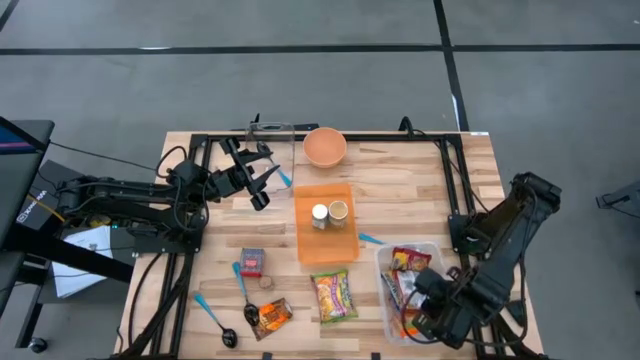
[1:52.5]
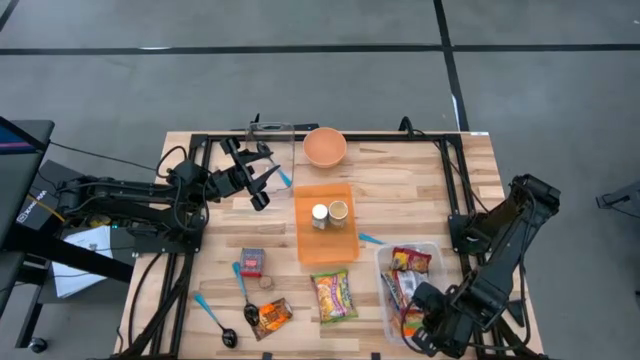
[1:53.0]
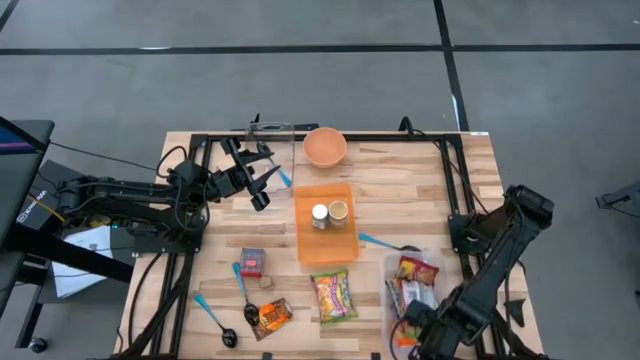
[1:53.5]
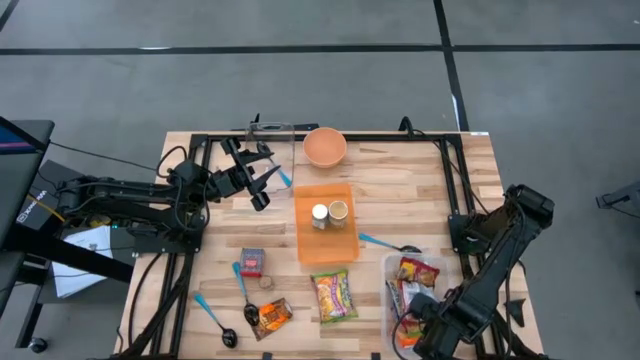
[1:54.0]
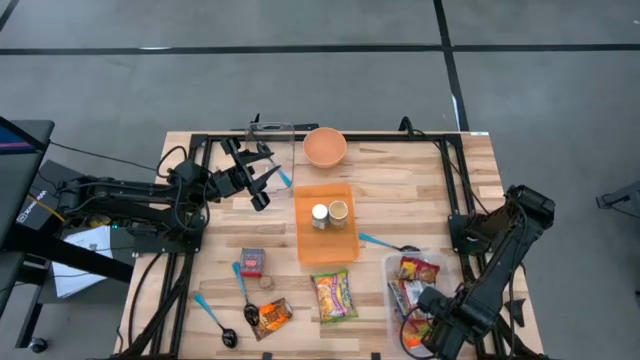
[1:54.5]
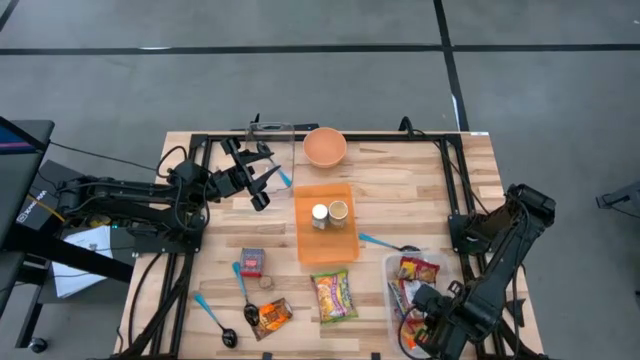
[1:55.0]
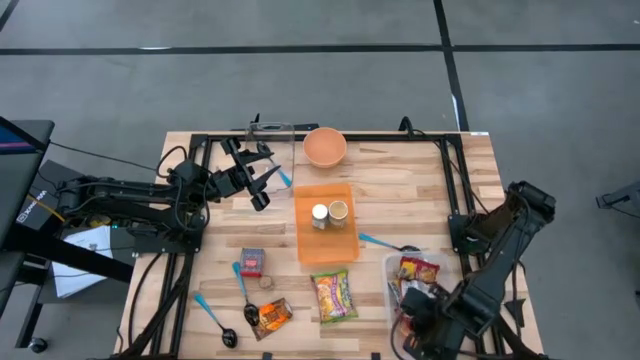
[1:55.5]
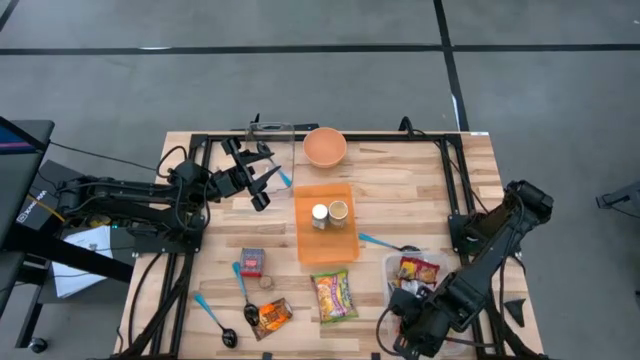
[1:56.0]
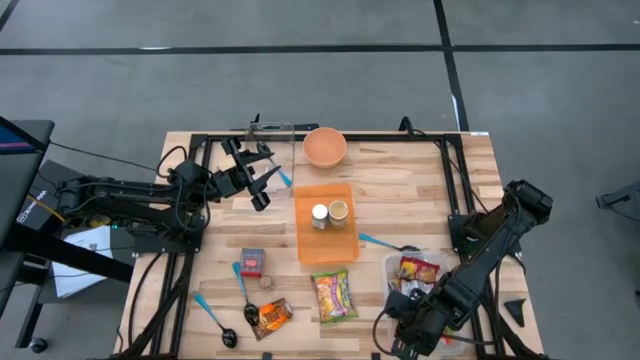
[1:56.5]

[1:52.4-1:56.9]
Task: Pick & Place Food Item
Adjust the noodle packs in the transparent container

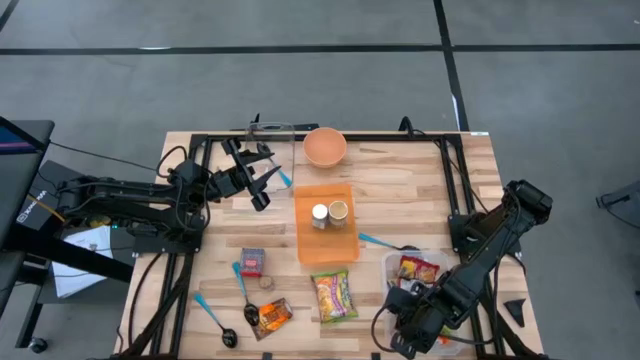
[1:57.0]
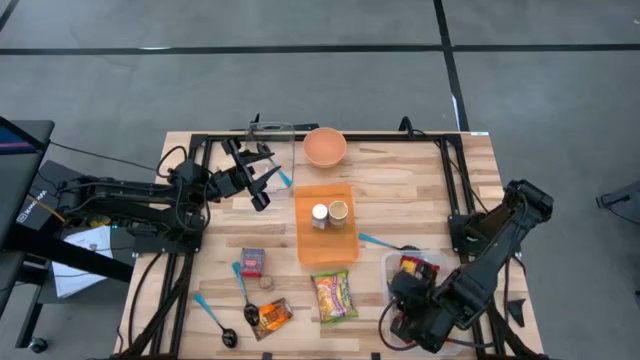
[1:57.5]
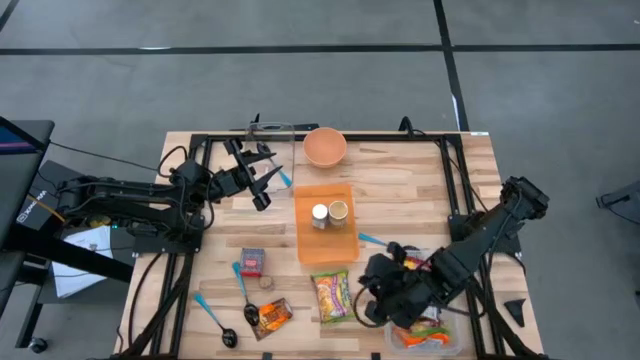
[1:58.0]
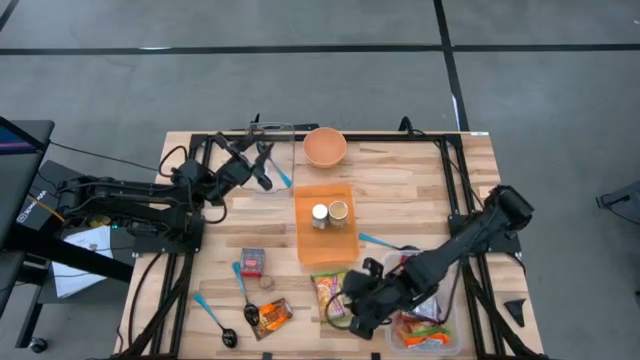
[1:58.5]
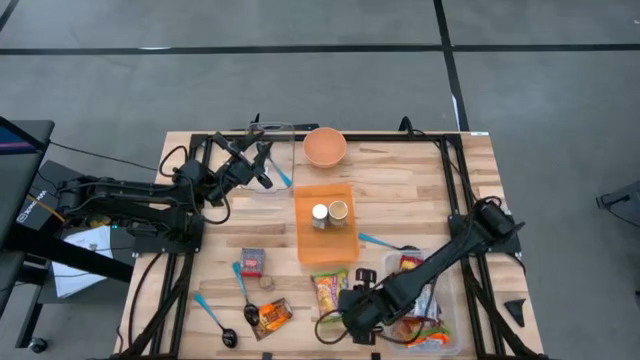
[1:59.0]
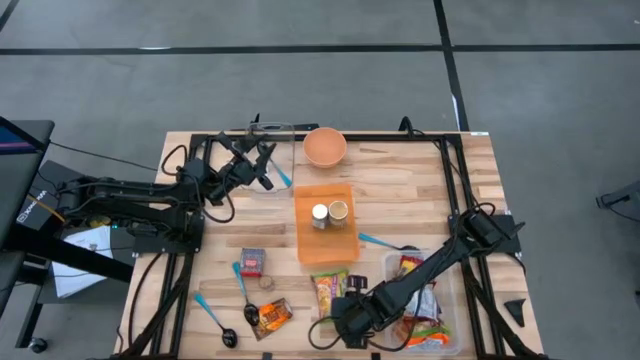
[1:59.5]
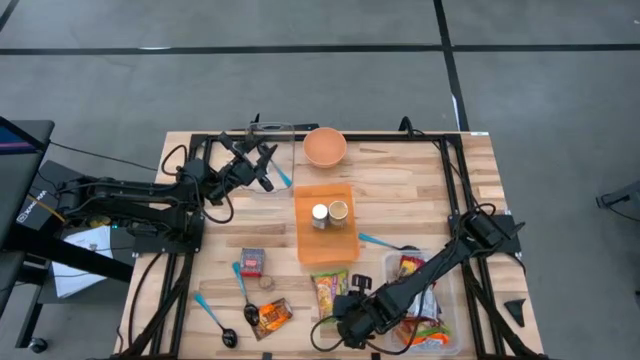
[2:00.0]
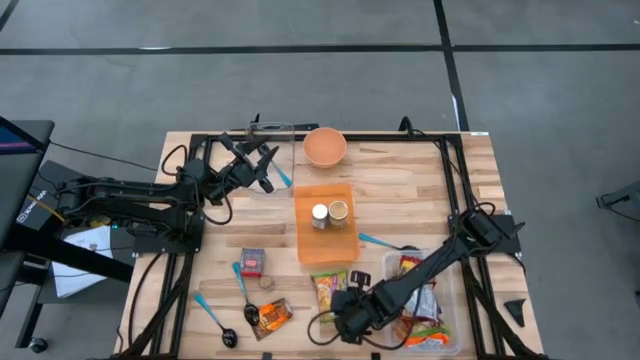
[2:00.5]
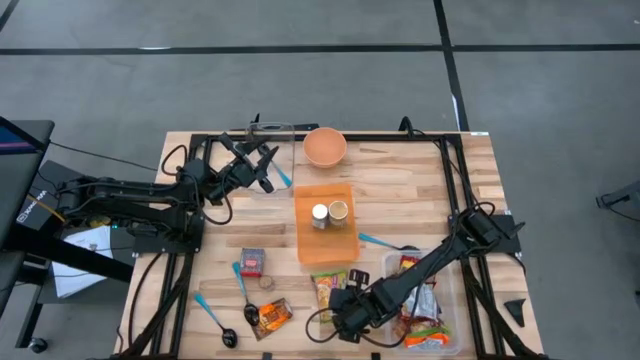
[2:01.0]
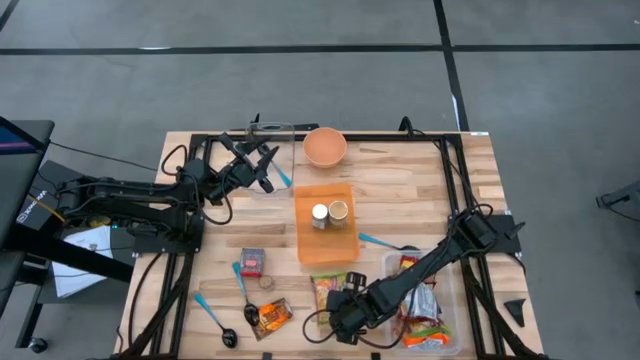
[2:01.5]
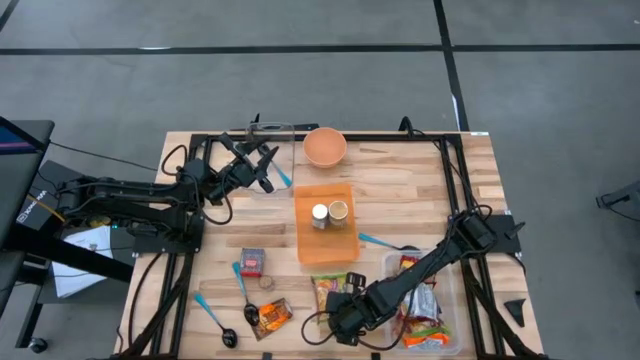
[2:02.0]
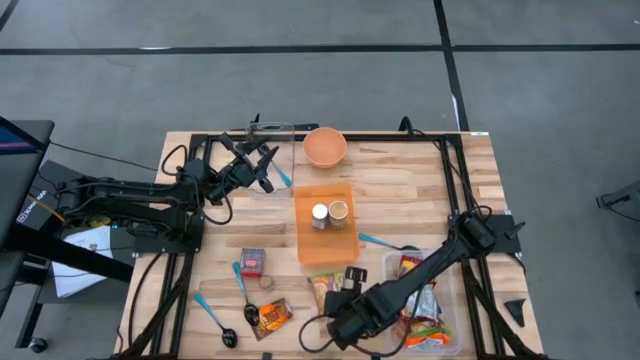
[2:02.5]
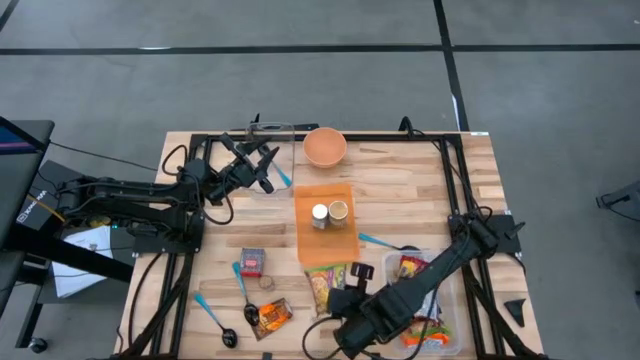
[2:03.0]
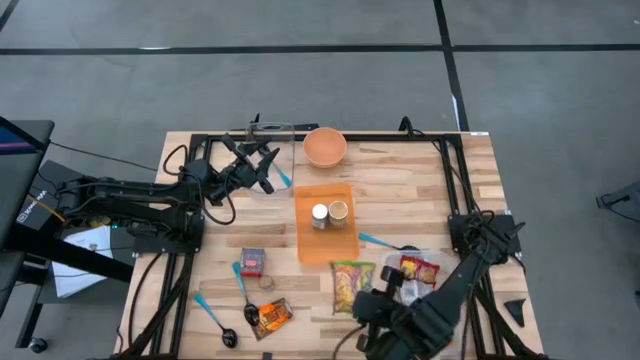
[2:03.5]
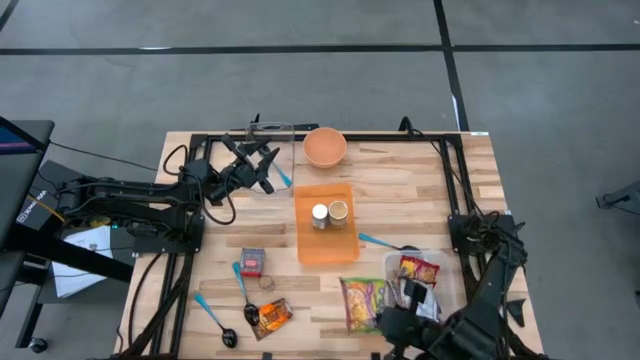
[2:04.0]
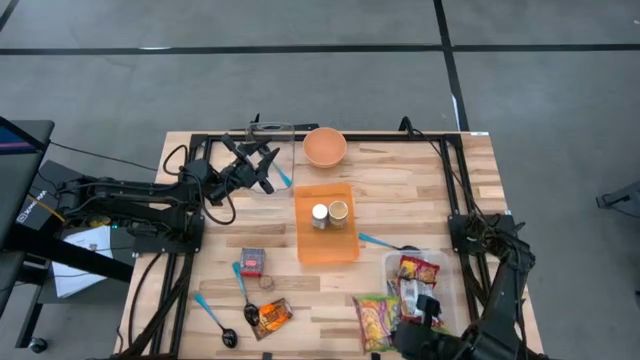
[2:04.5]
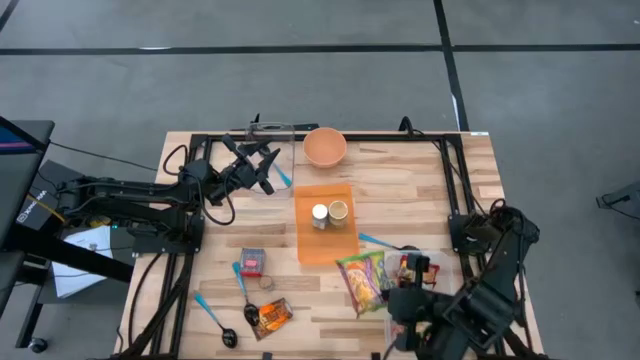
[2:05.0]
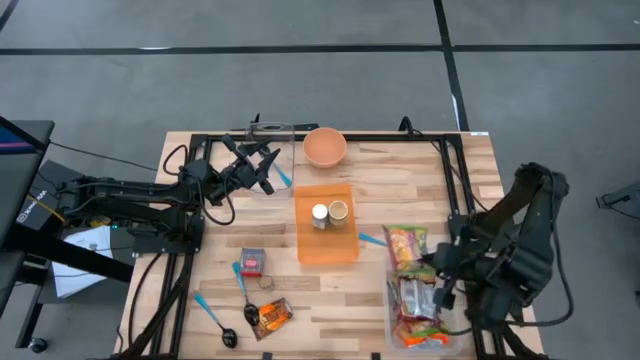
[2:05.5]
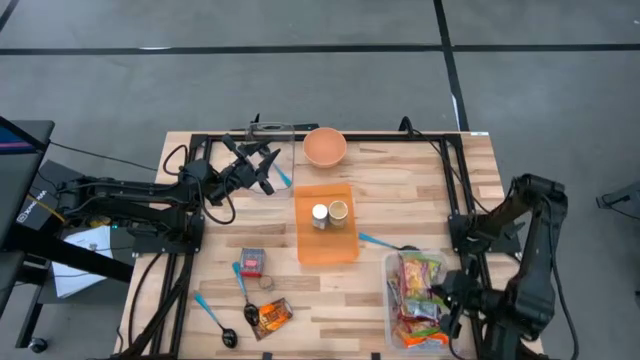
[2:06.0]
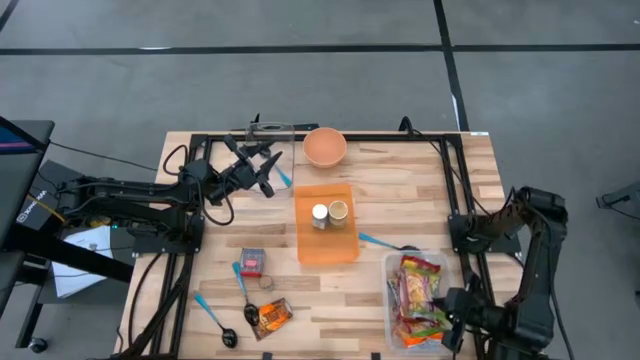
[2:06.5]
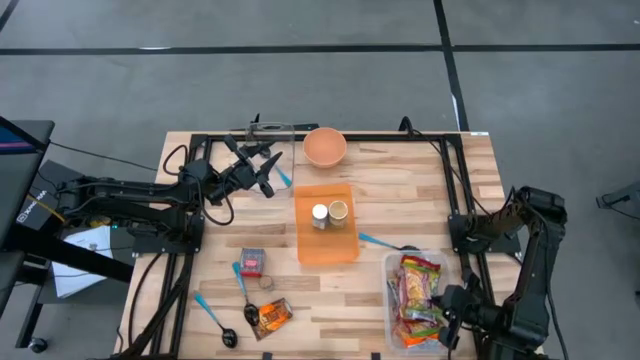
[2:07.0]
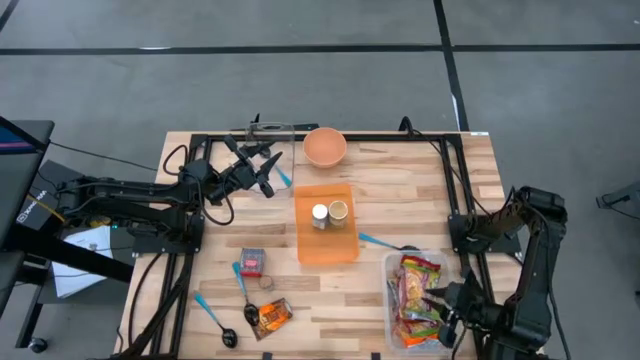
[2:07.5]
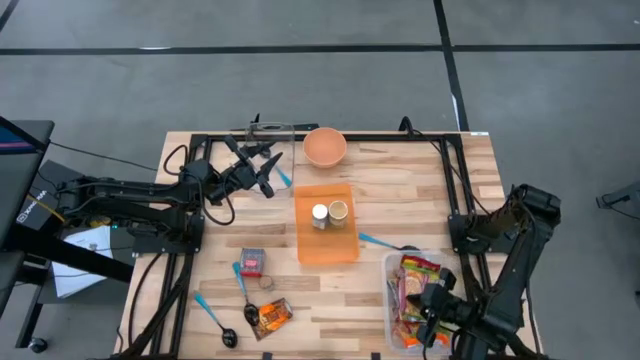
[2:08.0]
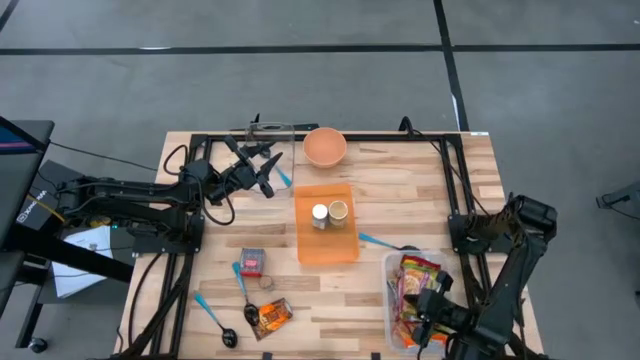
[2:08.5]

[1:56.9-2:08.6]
Put the green noodle pack into the transparent container
